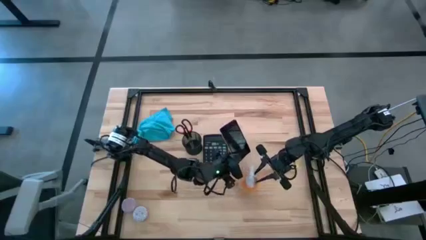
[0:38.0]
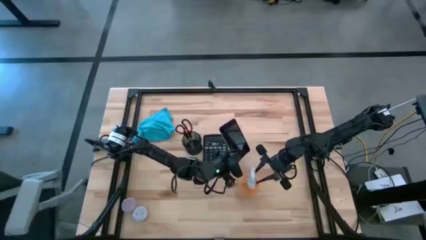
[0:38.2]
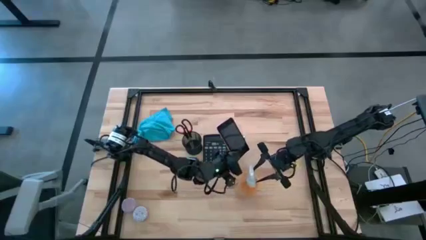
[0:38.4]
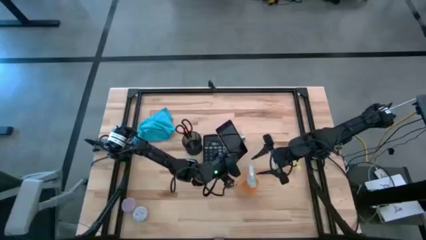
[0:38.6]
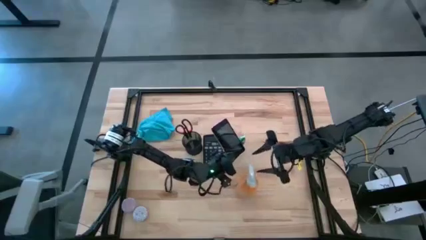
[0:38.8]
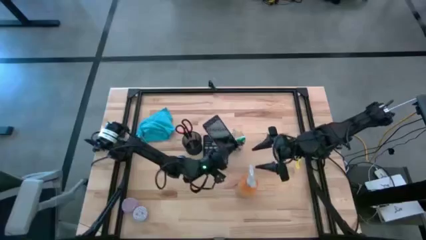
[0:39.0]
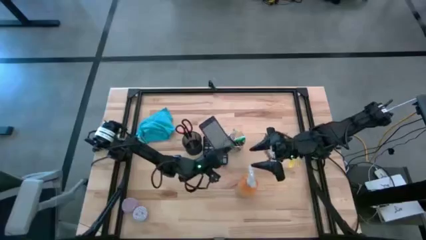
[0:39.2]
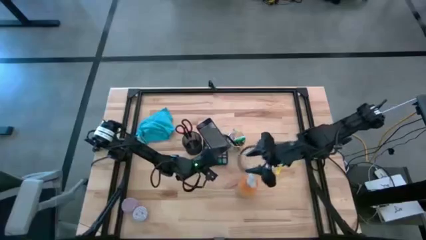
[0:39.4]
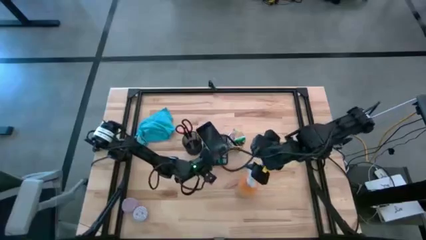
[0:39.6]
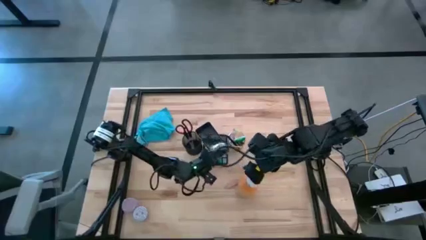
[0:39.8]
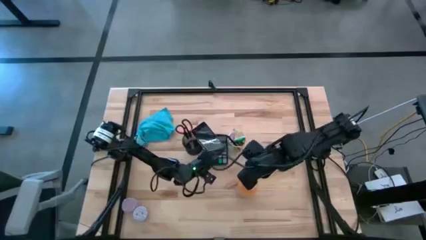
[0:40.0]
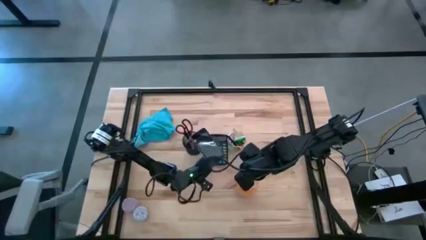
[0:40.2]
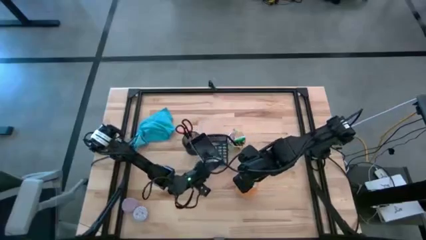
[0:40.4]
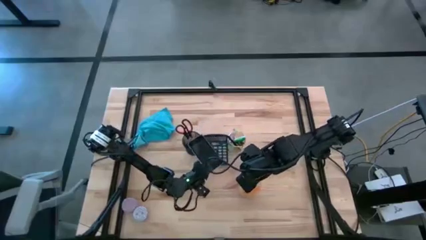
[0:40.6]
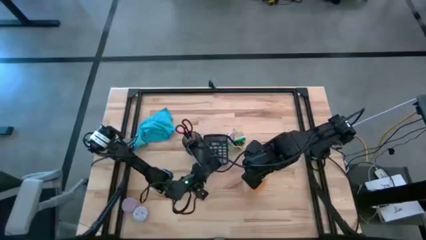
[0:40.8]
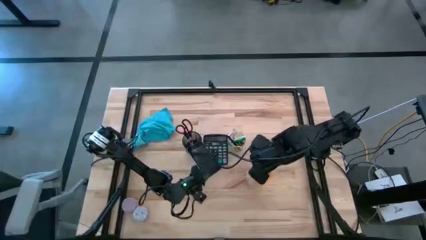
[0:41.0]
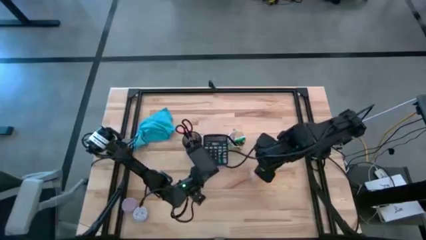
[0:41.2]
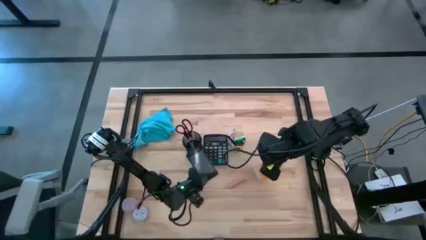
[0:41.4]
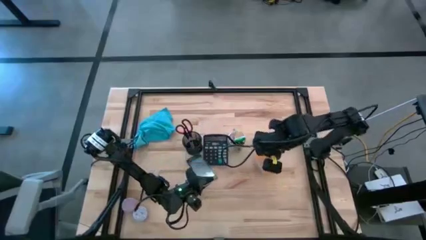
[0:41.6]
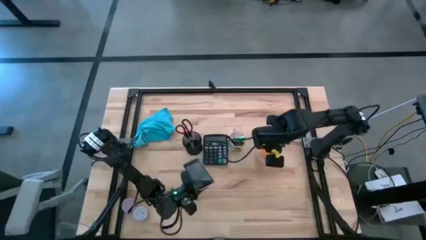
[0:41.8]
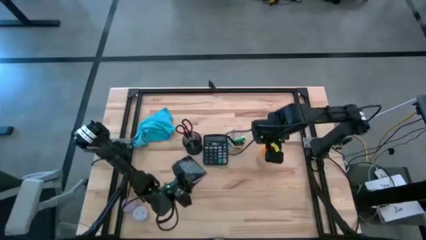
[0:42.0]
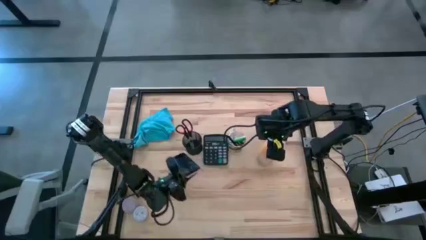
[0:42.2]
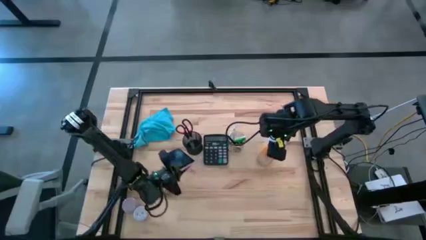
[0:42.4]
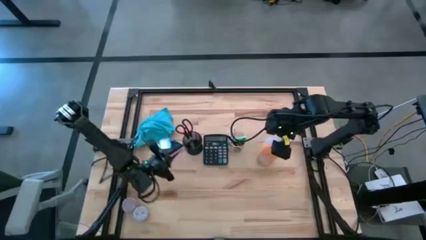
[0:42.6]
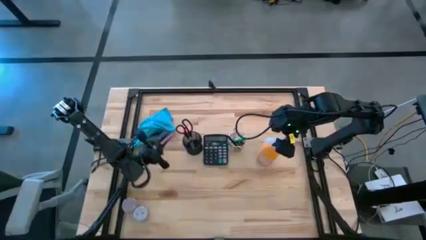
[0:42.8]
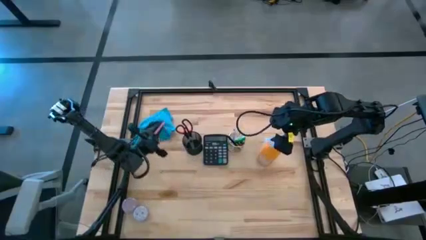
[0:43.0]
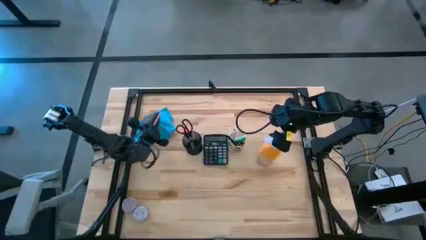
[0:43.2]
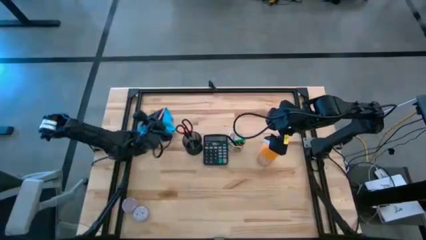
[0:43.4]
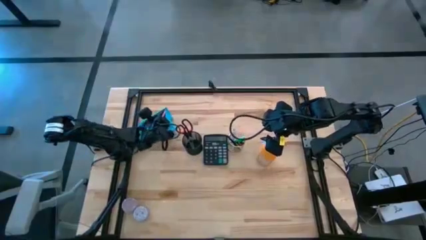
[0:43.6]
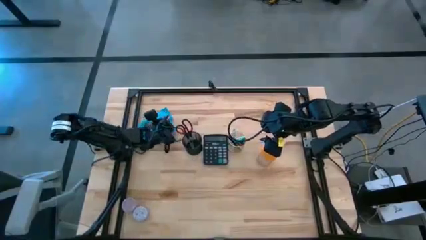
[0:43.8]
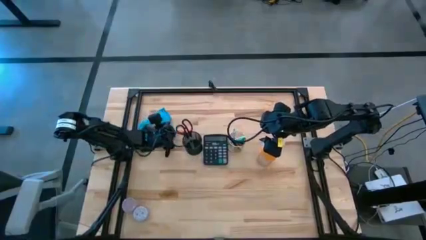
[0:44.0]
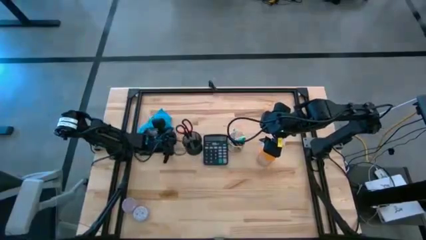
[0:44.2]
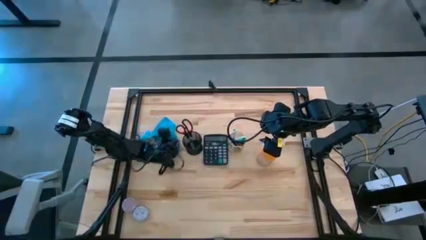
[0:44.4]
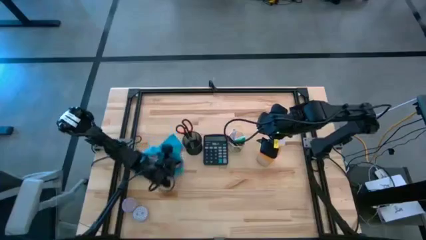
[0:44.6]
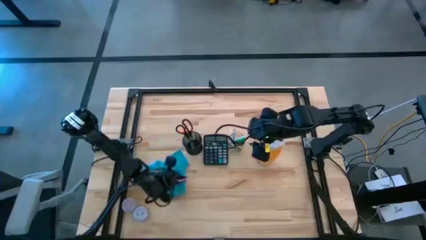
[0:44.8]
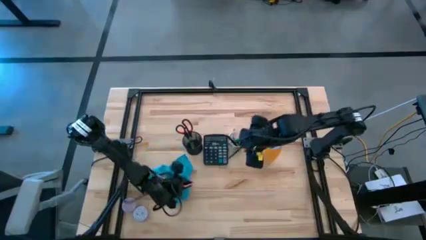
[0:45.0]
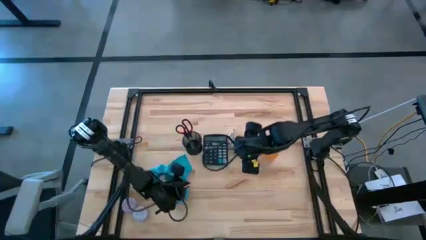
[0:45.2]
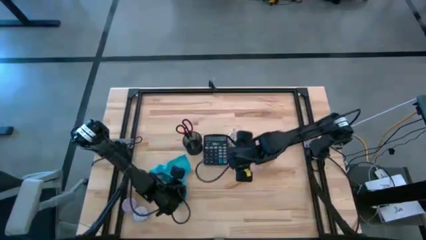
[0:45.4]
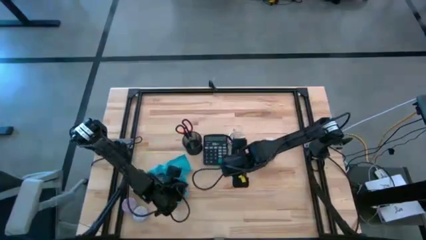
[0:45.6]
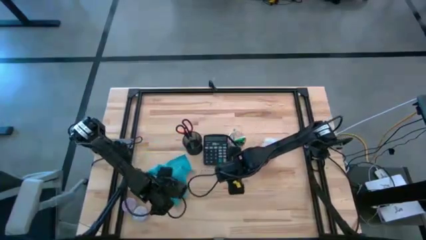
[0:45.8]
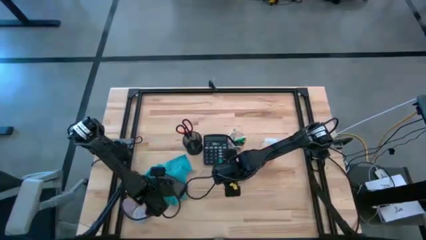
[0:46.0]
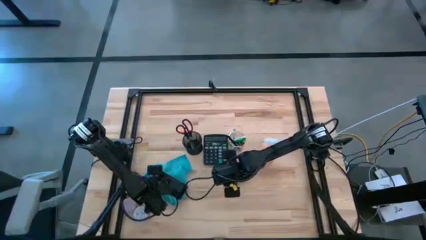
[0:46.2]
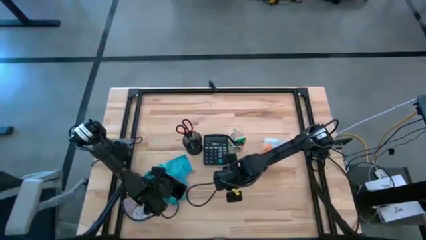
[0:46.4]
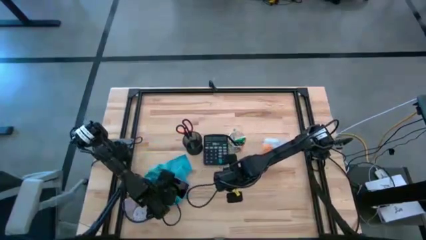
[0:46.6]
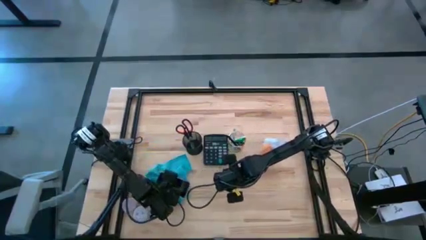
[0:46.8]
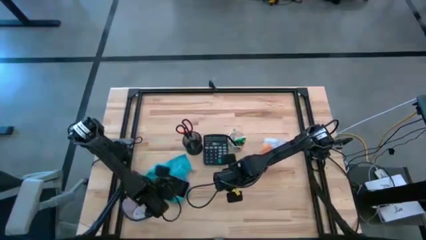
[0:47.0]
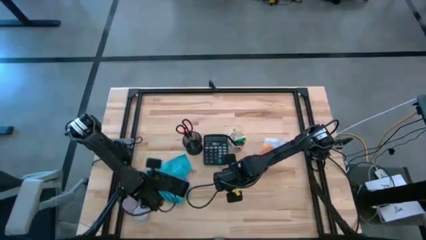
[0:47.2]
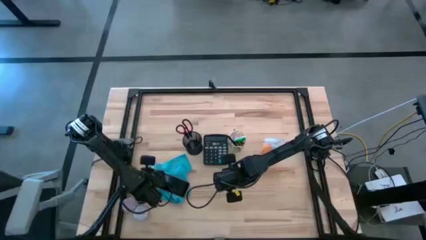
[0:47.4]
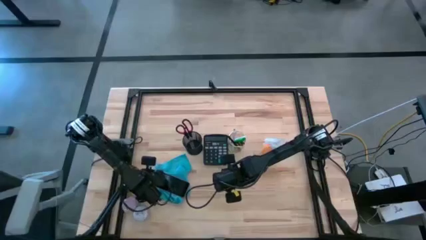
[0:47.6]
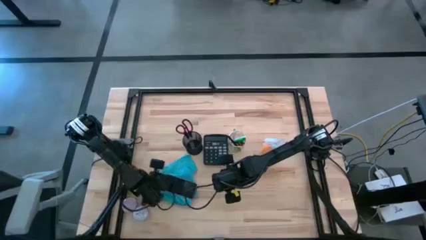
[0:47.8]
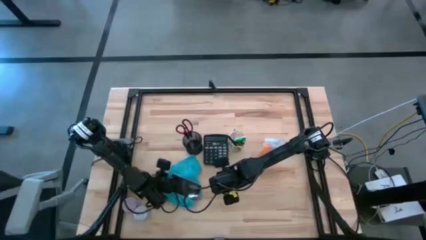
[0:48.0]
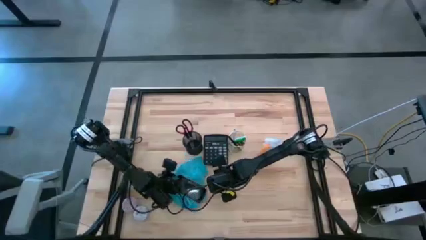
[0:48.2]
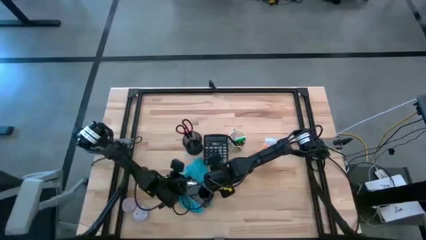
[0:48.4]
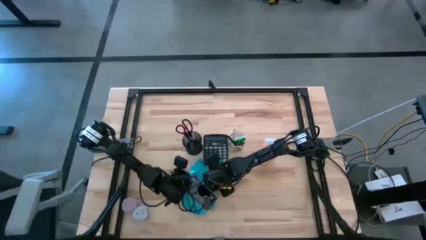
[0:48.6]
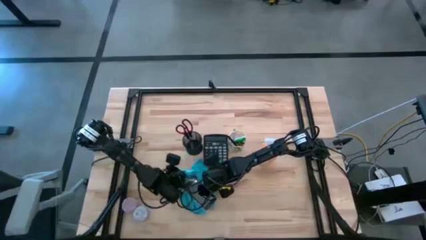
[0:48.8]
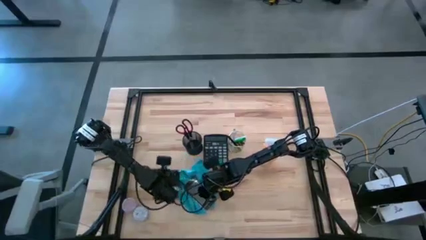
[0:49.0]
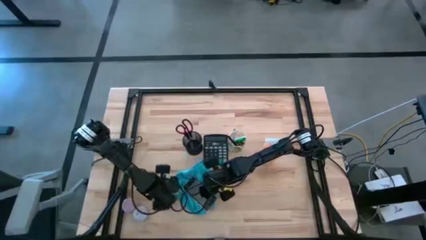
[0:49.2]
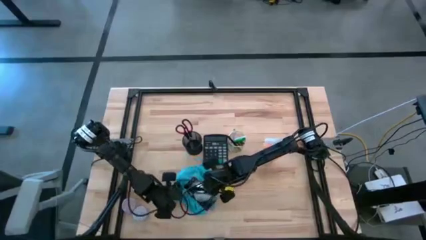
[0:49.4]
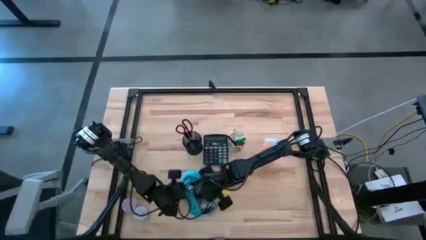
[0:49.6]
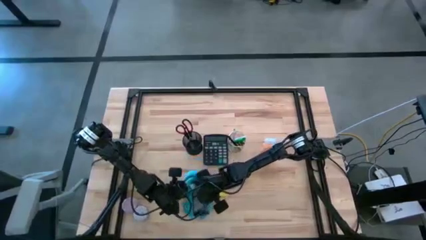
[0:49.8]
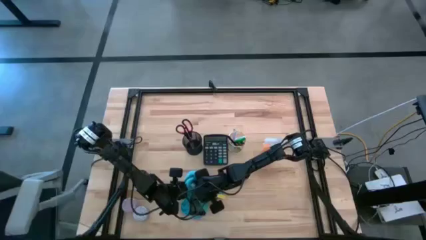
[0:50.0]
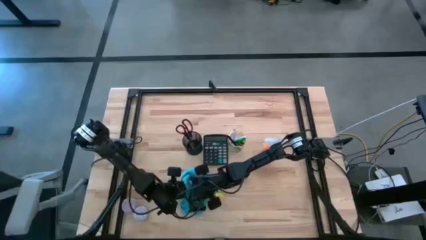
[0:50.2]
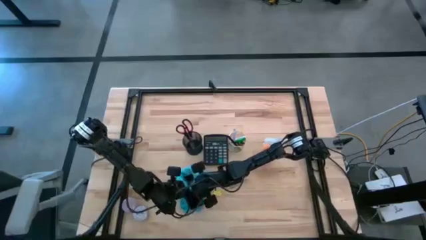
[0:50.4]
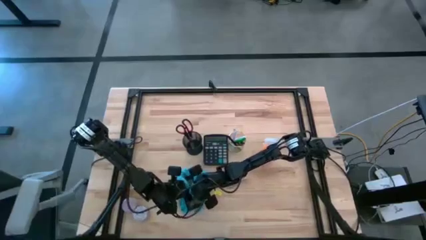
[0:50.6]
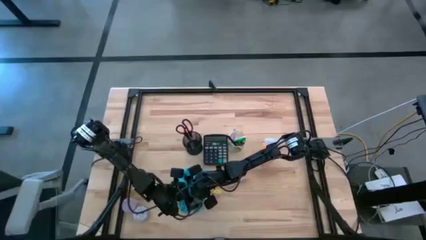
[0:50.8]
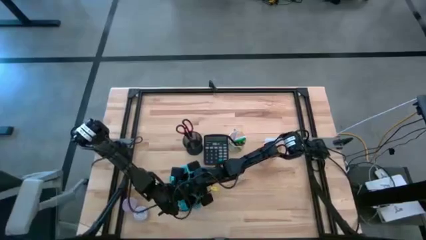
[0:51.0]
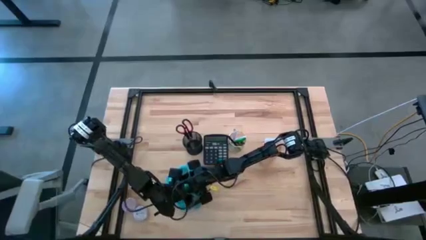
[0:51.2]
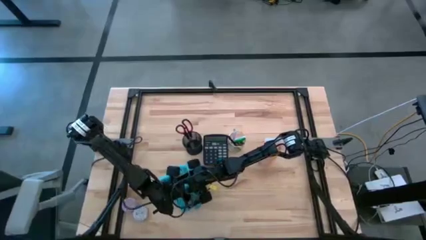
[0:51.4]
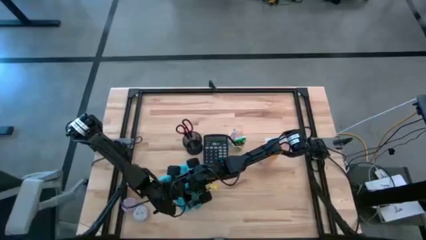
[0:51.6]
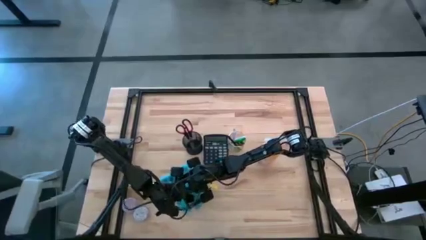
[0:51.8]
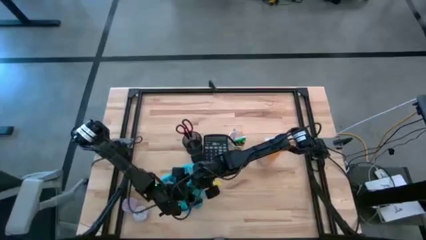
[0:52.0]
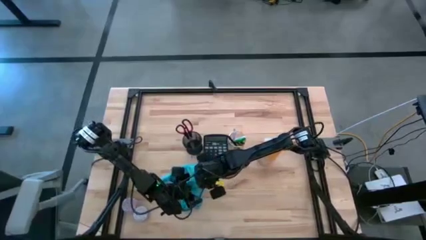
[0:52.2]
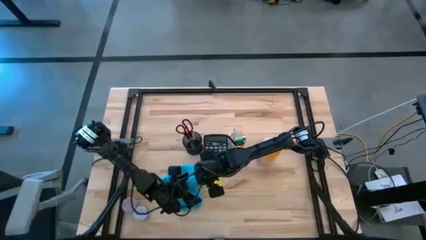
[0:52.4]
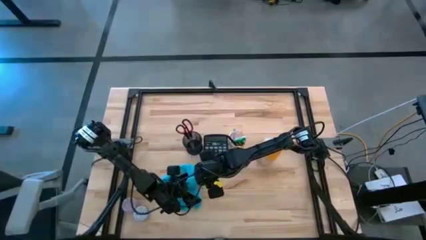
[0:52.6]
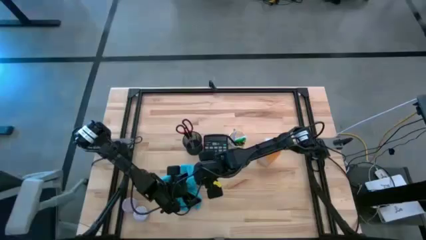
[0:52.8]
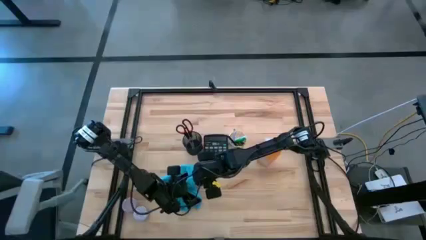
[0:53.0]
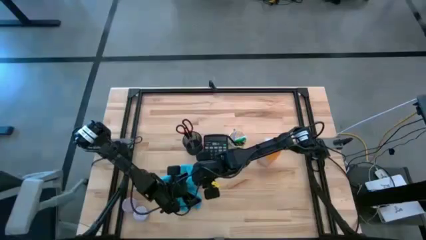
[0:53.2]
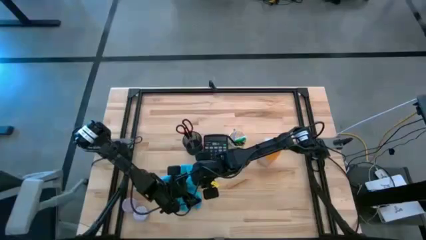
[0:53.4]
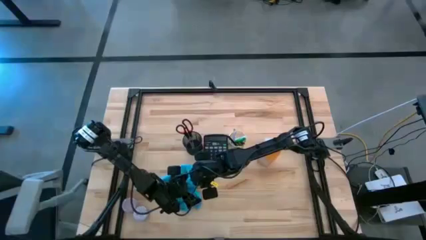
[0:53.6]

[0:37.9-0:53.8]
Task: Apply microfiber cloth
Wipe the front and back of the cellphone with the blue microfiber cloth
